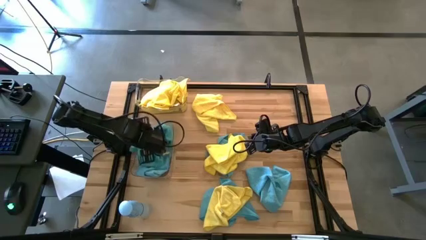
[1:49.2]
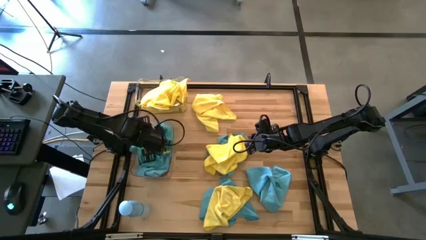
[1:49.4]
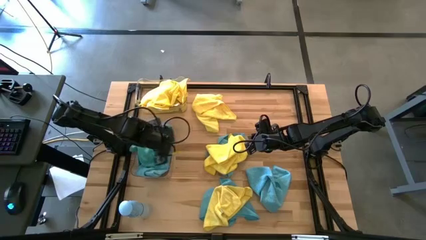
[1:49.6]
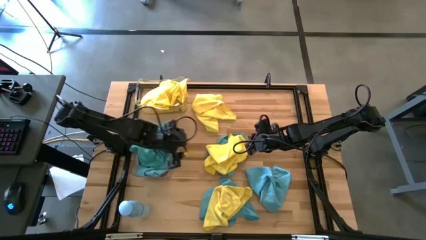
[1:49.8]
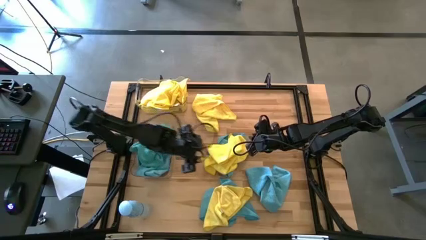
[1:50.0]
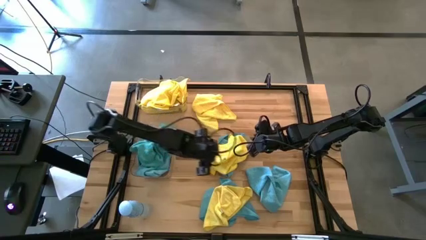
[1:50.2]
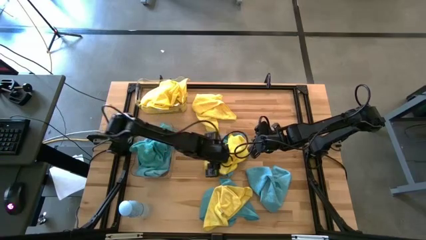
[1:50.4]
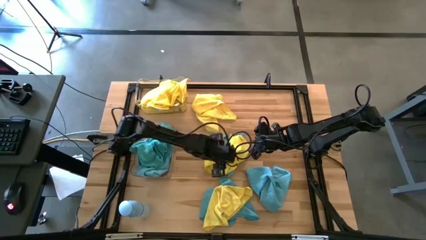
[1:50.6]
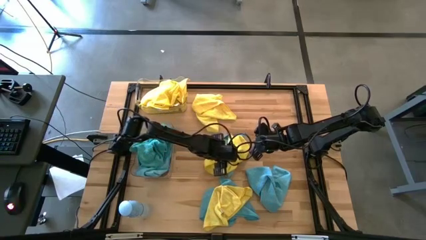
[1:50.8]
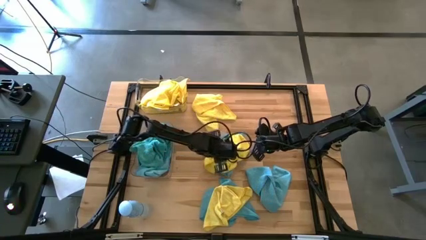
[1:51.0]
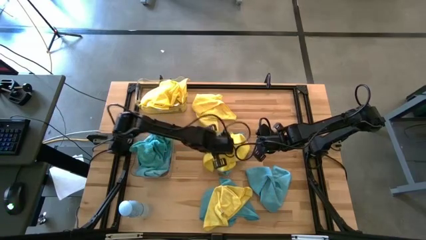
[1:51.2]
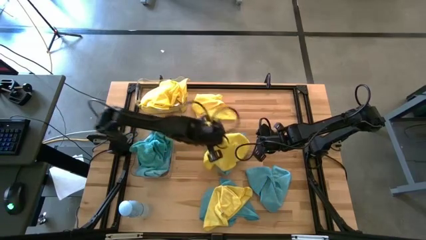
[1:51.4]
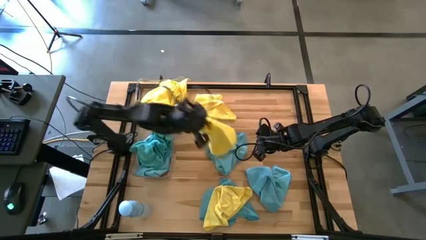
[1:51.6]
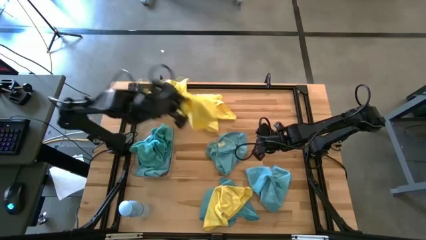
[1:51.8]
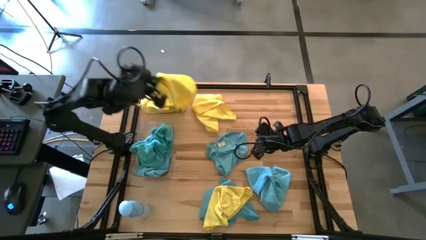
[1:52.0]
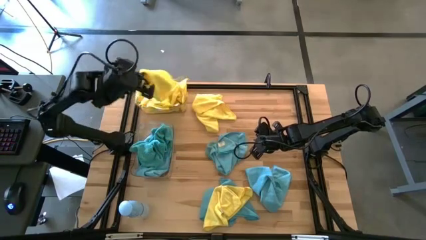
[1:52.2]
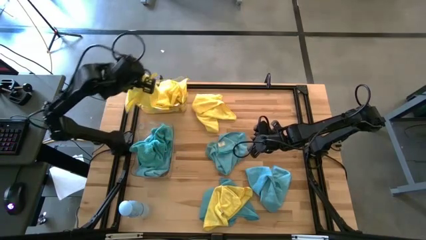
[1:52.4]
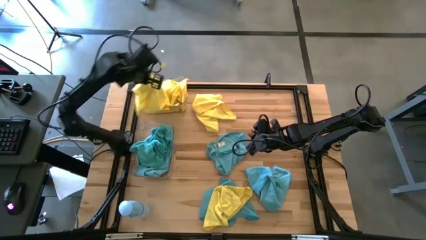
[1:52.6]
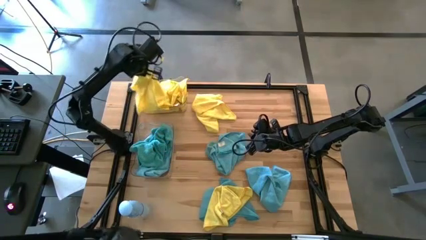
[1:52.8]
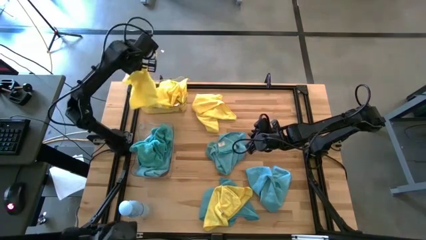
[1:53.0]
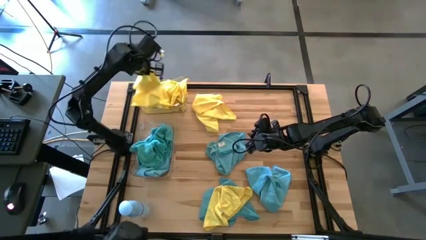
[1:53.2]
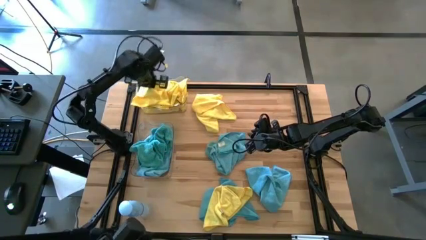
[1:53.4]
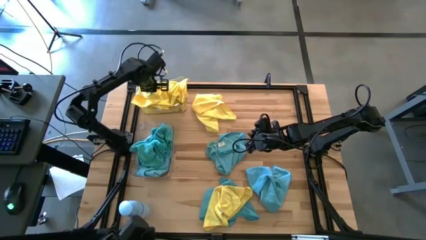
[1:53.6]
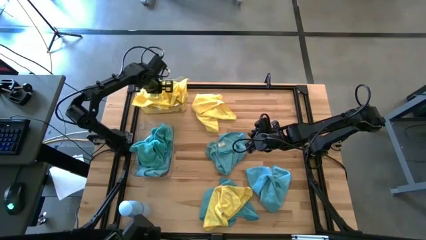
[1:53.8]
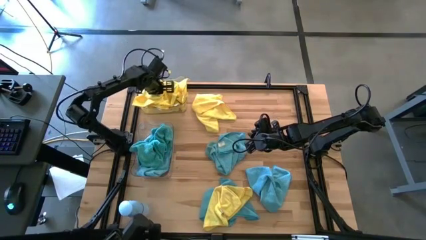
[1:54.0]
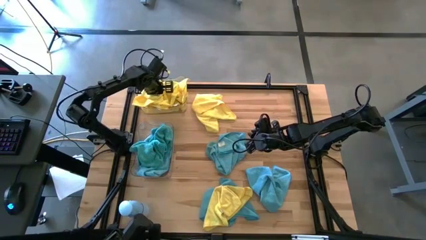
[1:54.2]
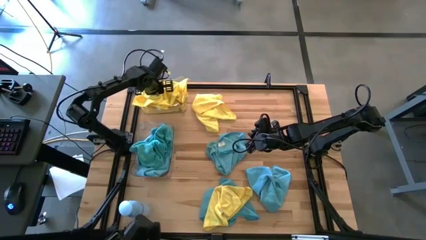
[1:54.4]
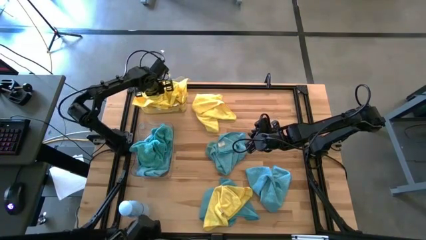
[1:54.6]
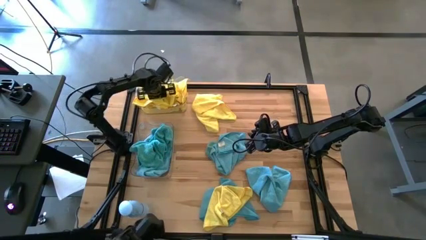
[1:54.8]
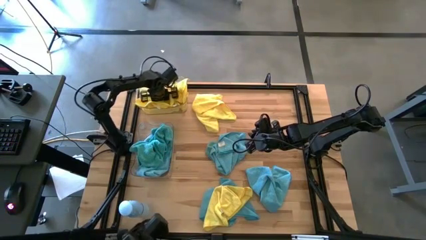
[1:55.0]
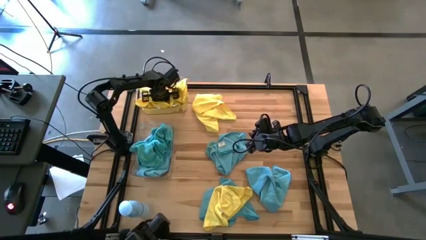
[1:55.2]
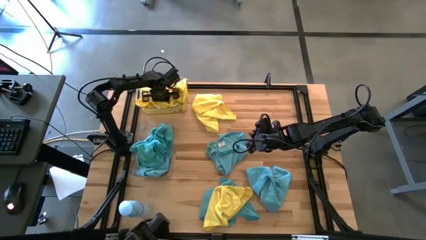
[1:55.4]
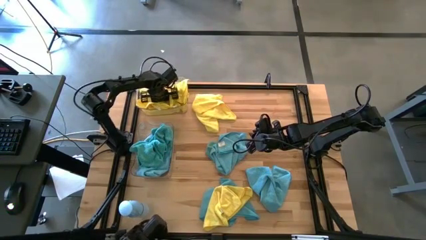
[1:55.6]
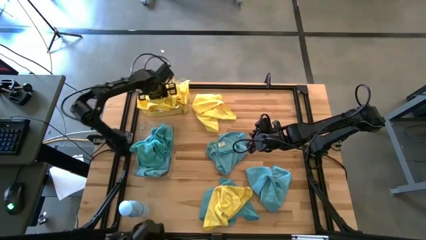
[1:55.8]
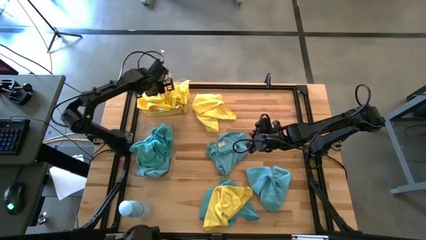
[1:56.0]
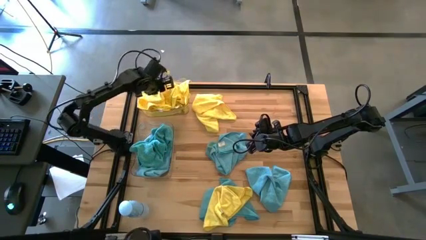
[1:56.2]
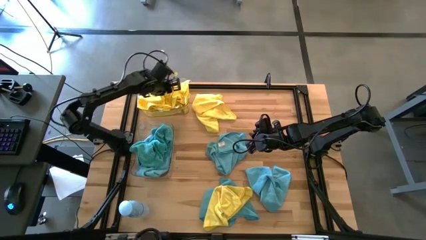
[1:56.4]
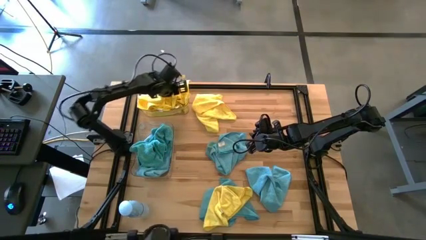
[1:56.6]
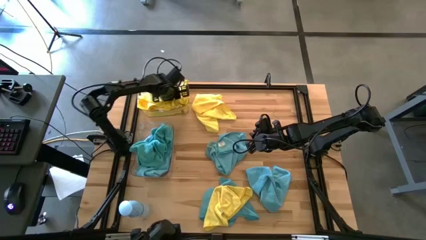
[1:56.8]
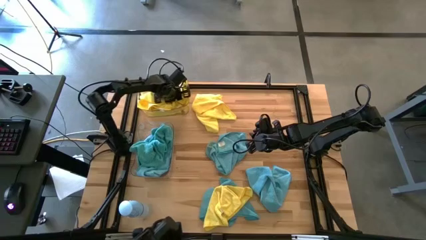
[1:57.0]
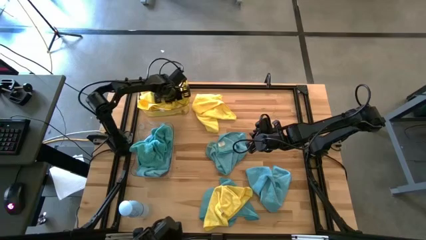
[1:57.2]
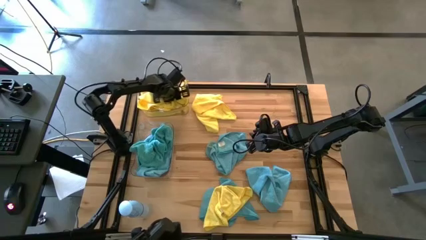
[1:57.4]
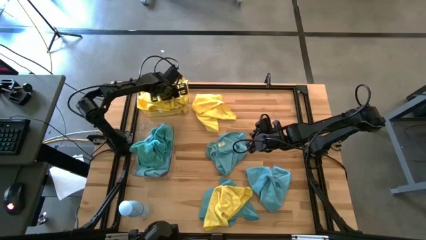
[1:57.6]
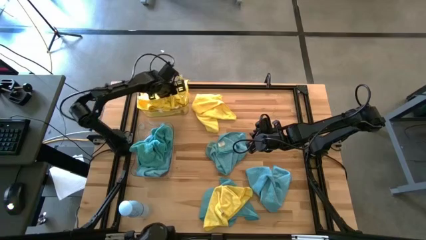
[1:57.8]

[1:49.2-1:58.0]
Task: Sort microfiber towel by color & place in baskets
Put the yellow microfiber cloth into the top transparent bin

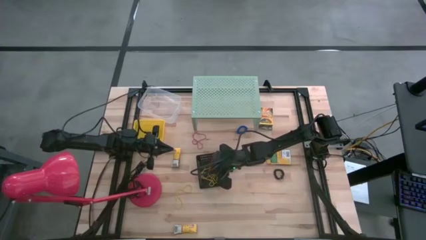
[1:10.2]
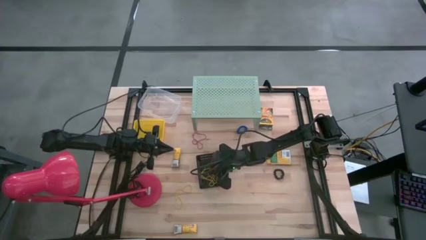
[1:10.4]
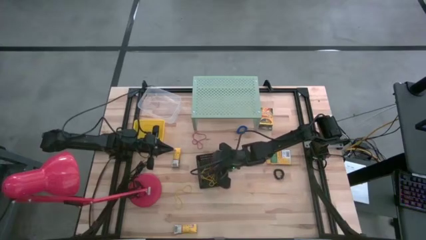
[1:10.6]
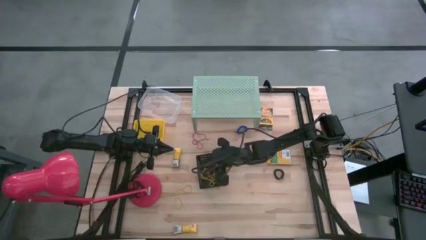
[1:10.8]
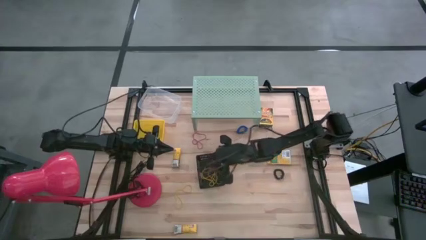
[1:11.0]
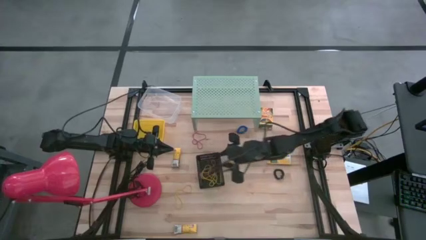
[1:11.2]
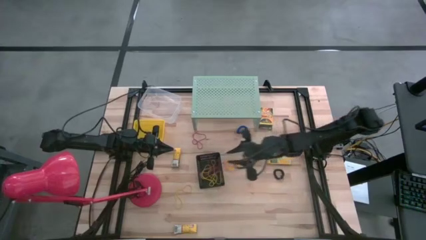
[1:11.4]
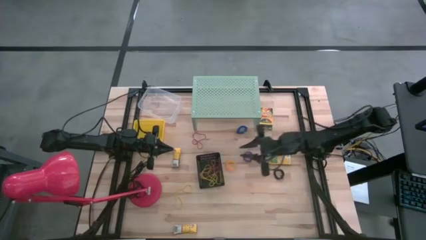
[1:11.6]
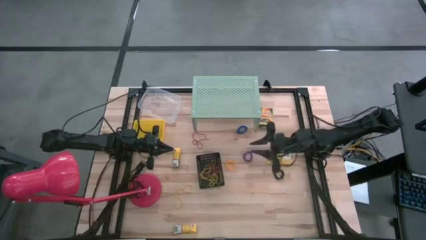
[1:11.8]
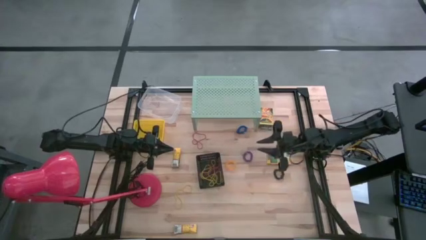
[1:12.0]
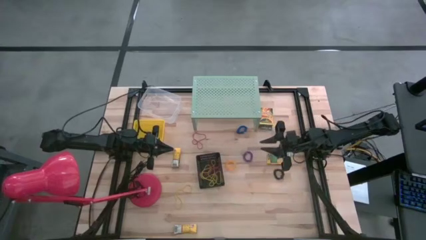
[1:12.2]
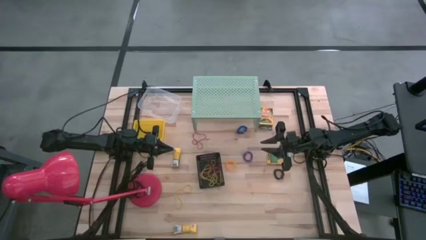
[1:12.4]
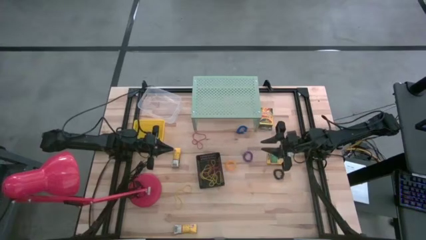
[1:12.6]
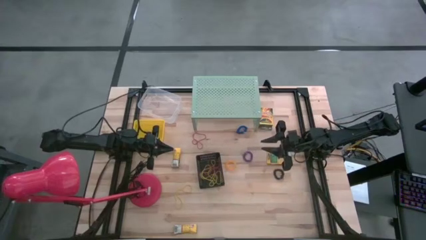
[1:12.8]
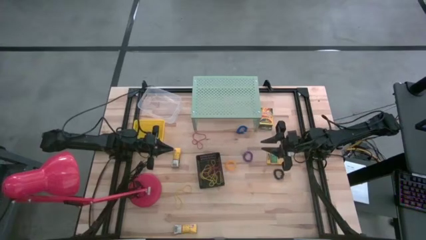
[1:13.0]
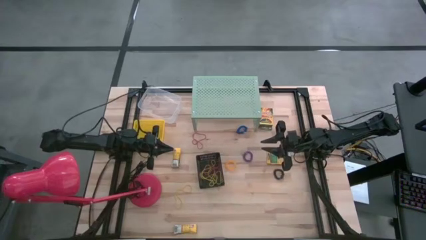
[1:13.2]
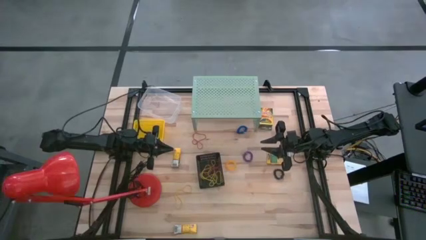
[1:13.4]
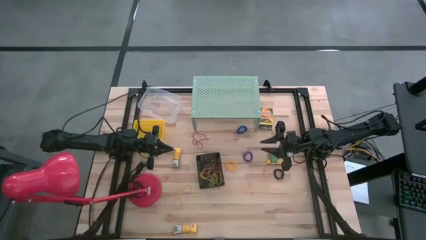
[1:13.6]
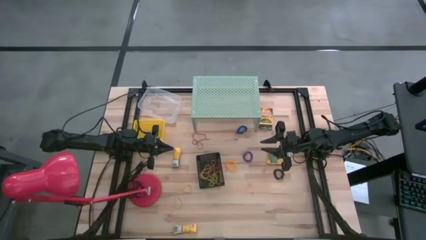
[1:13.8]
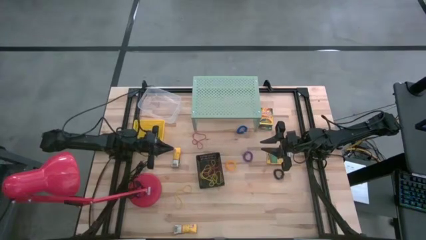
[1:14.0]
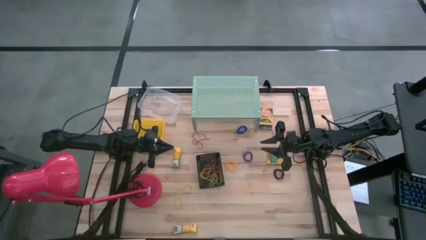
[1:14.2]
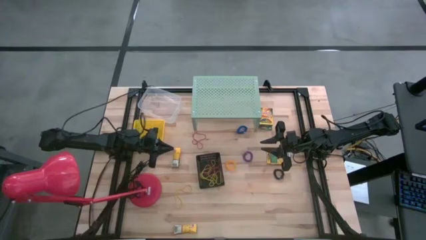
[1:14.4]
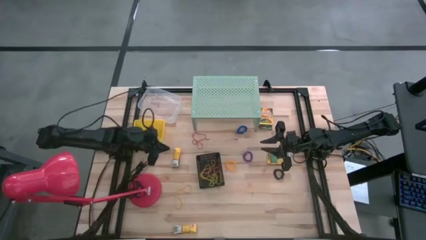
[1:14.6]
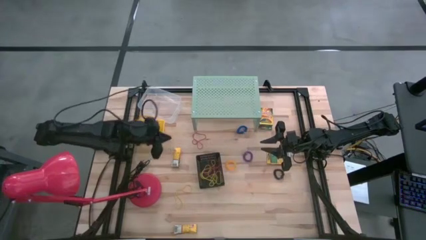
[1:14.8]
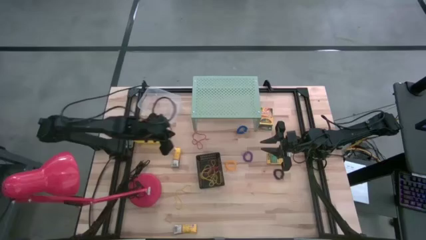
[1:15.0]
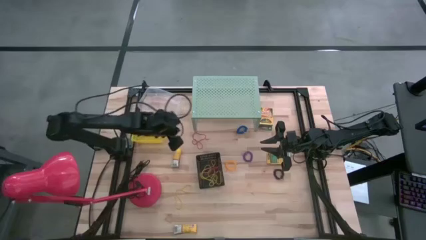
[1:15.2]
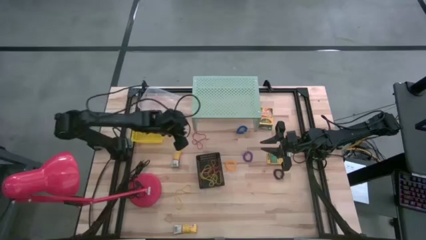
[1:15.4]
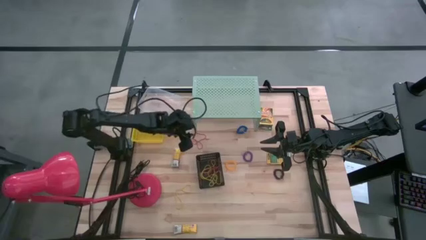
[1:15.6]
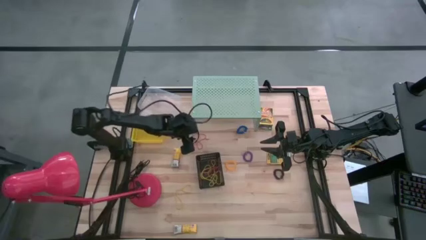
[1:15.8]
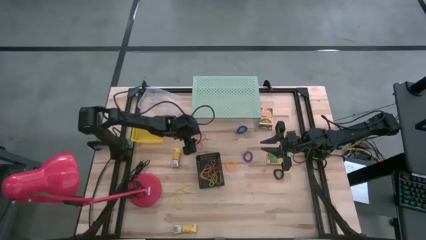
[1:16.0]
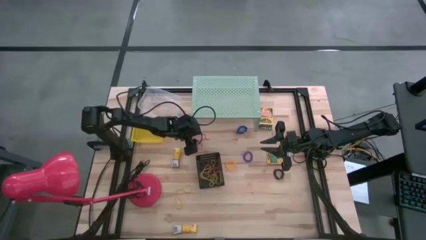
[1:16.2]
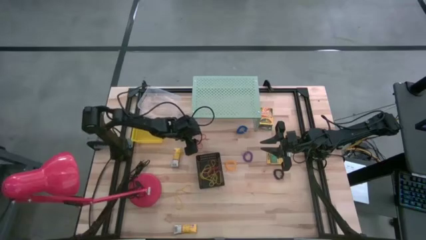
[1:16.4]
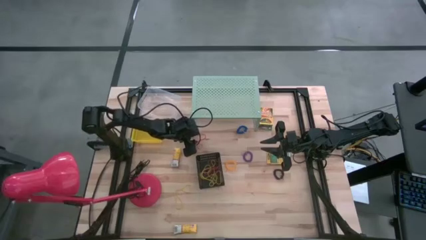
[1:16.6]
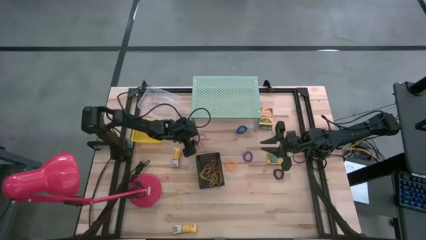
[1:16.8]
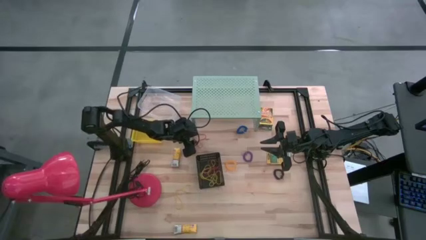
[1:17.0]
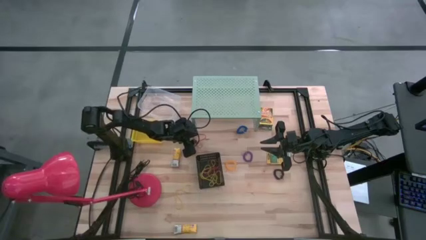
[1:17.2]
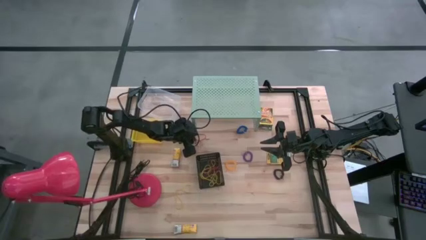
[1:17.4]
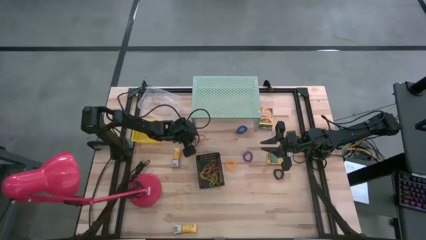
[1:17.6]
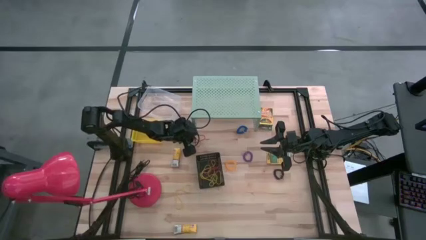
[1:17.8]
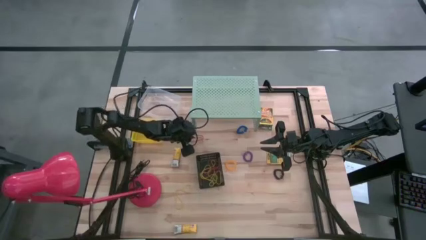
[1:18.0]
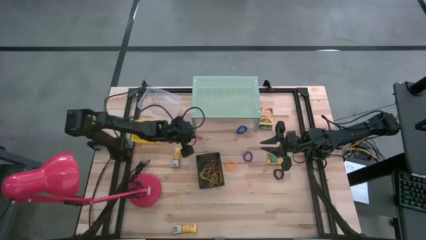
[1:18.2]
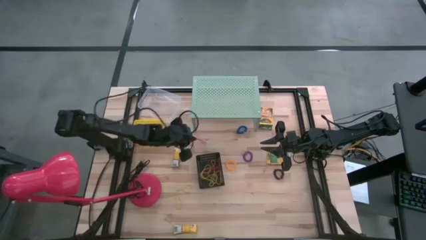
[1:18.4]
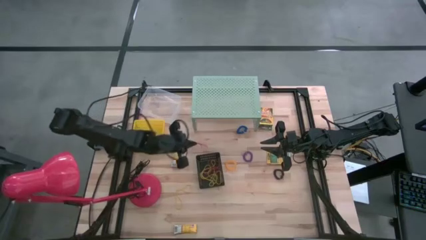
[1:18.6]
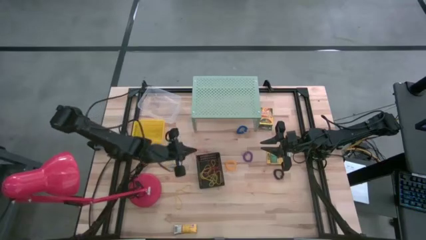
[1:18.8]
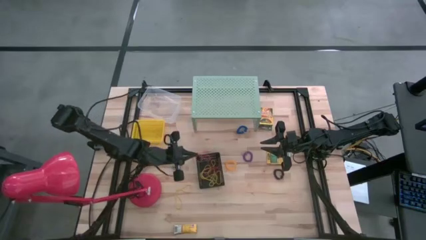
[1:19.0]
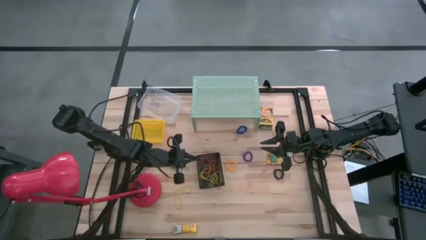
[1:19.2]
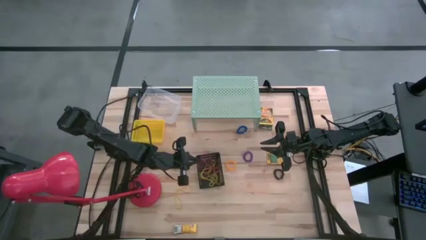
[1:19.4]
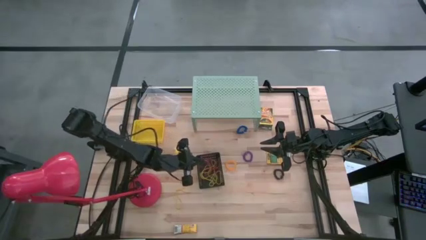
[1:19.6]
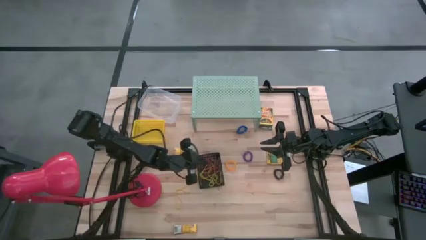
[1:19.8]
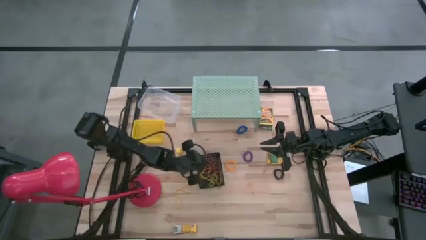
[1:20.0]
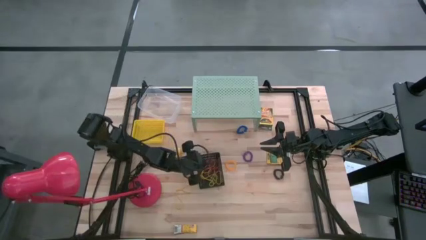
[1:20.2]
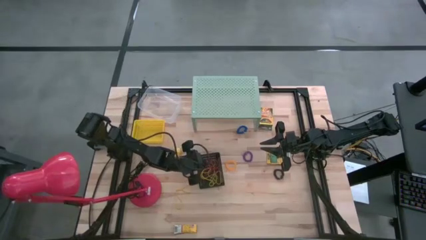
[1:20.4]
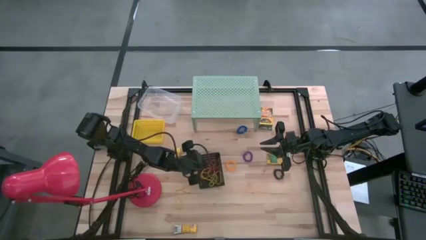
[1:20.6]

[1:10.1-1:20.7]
Task: Pick & Place Office Desk Supplies
Put the red rubber band into the black bin
